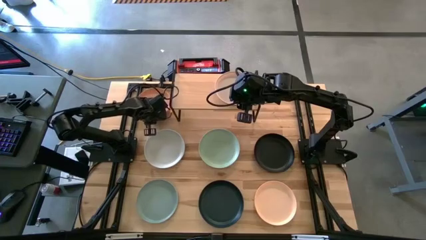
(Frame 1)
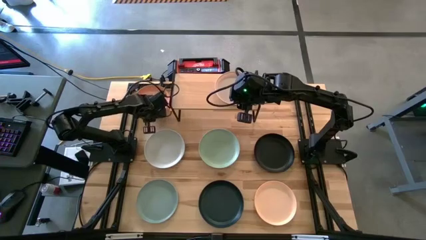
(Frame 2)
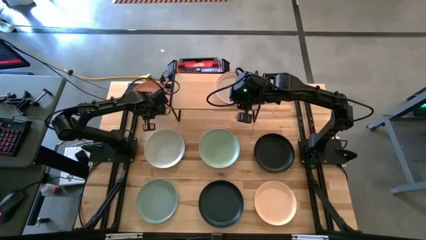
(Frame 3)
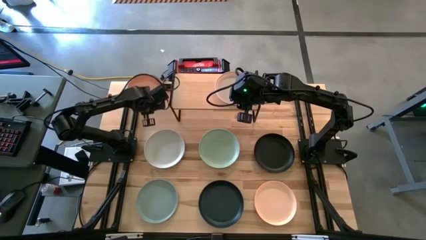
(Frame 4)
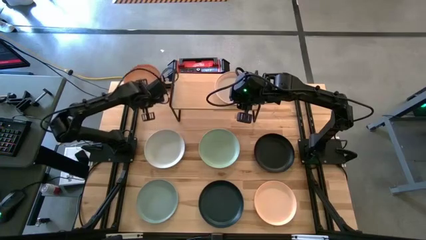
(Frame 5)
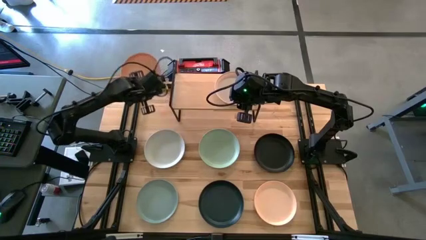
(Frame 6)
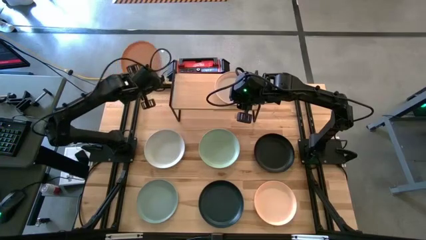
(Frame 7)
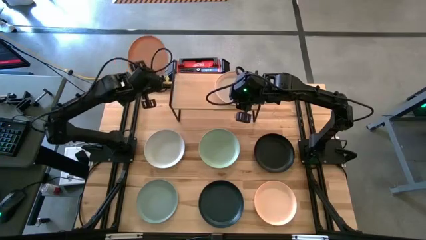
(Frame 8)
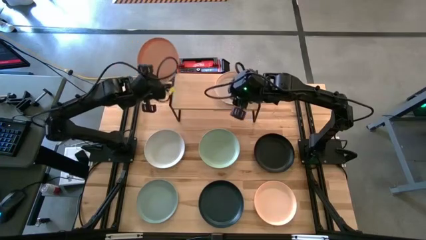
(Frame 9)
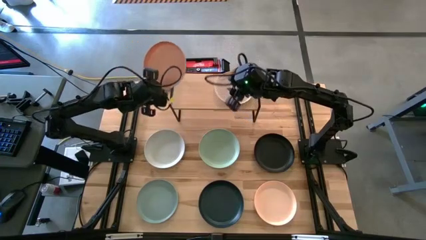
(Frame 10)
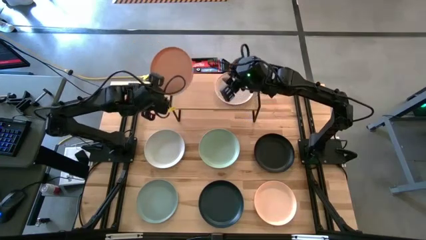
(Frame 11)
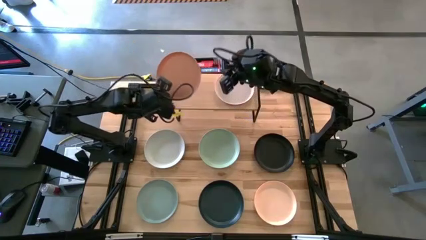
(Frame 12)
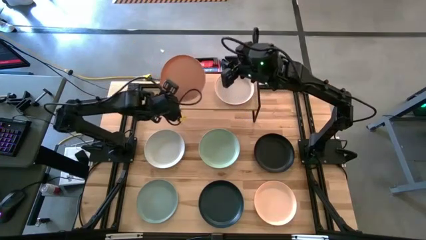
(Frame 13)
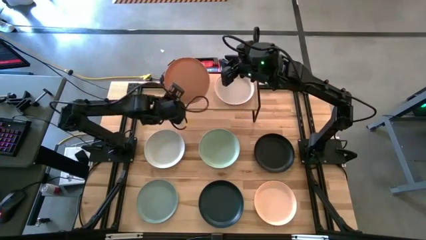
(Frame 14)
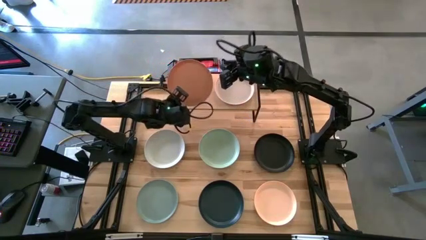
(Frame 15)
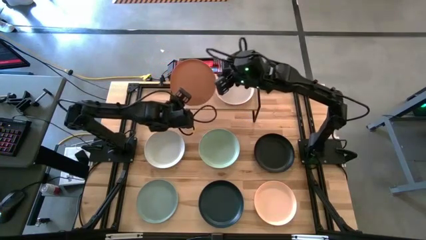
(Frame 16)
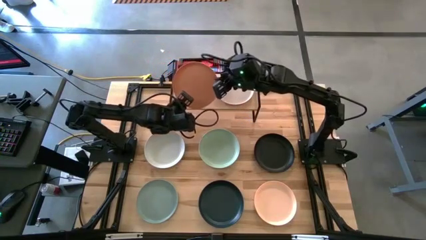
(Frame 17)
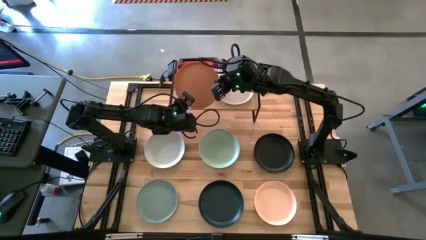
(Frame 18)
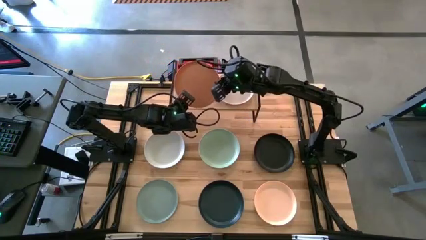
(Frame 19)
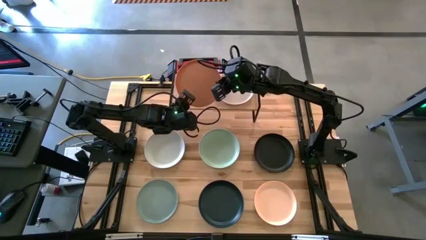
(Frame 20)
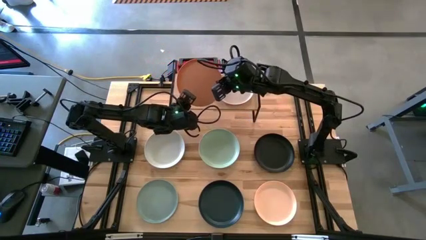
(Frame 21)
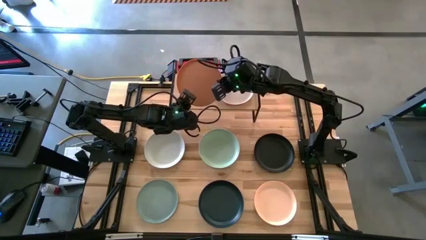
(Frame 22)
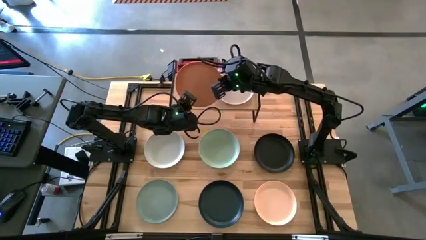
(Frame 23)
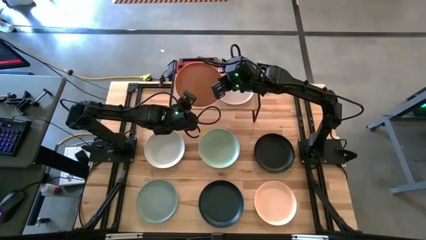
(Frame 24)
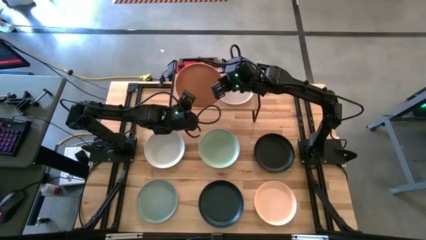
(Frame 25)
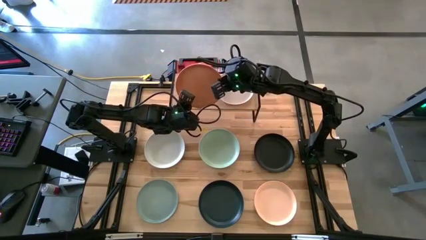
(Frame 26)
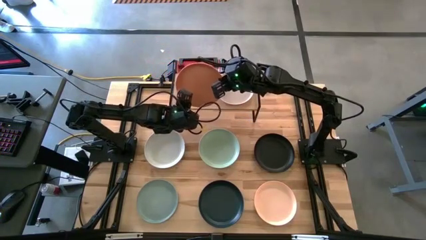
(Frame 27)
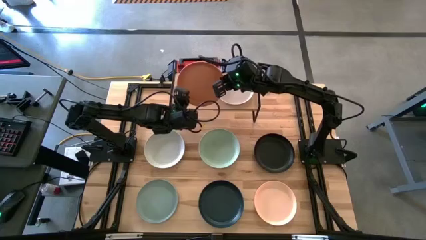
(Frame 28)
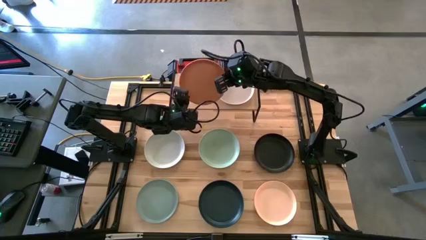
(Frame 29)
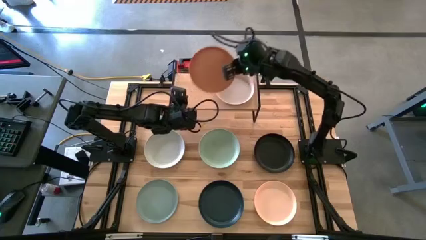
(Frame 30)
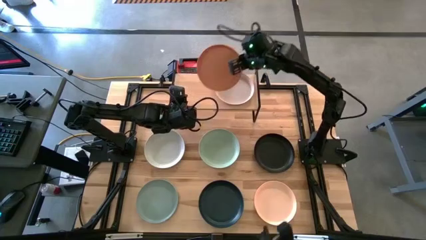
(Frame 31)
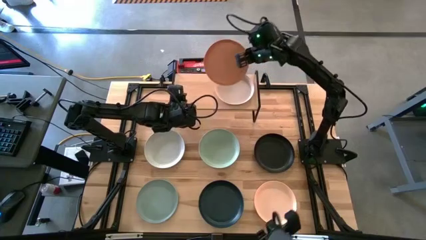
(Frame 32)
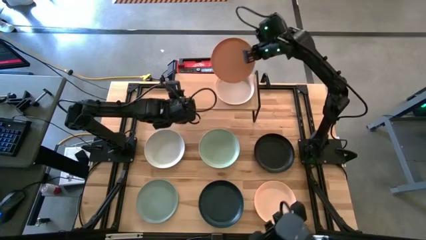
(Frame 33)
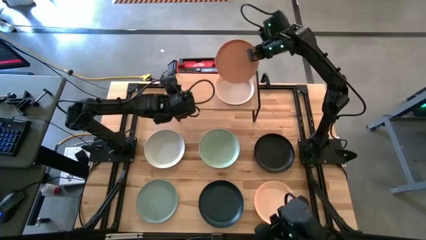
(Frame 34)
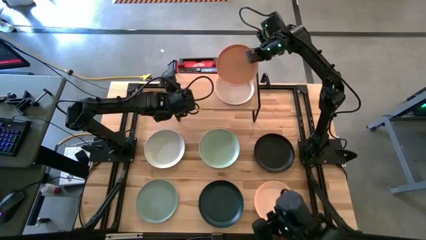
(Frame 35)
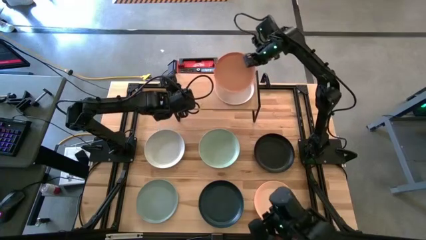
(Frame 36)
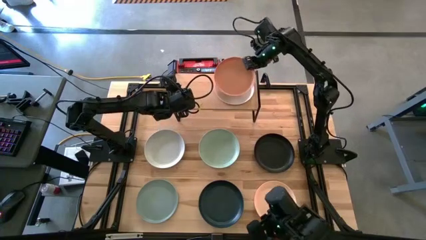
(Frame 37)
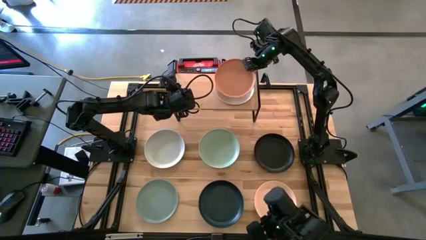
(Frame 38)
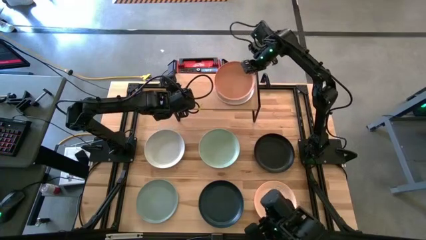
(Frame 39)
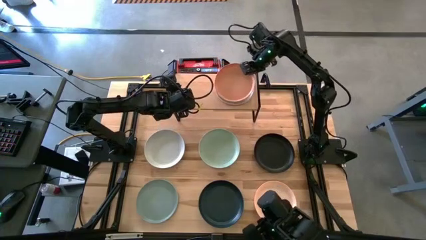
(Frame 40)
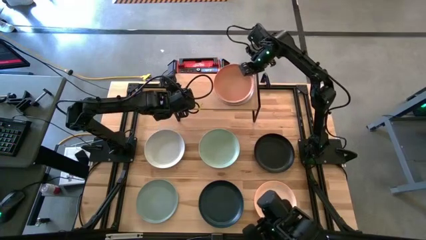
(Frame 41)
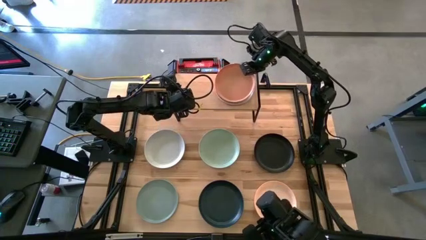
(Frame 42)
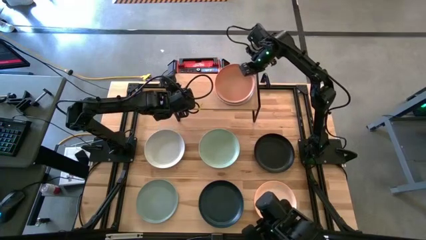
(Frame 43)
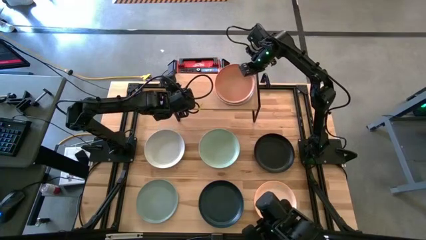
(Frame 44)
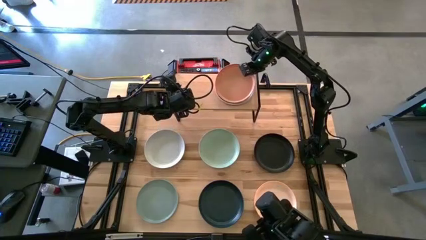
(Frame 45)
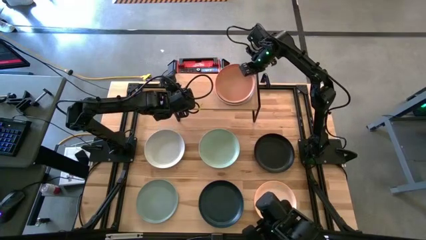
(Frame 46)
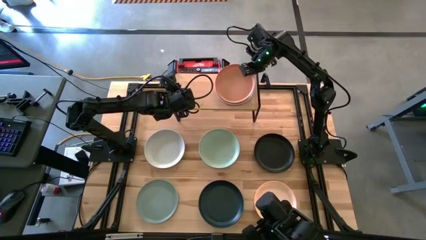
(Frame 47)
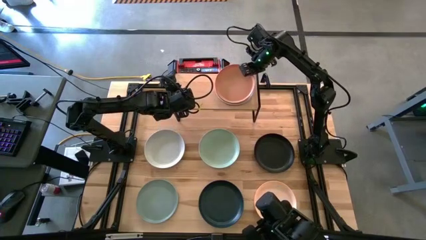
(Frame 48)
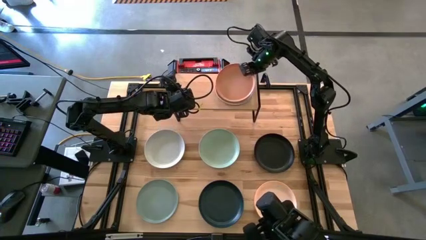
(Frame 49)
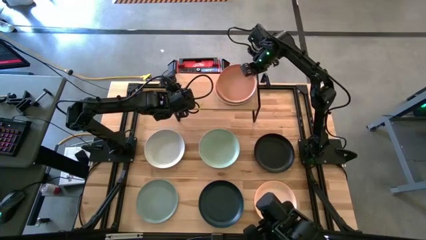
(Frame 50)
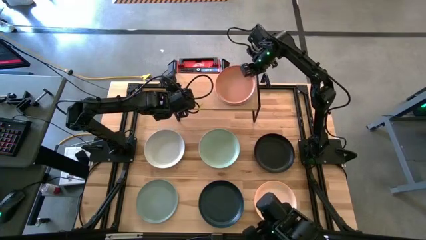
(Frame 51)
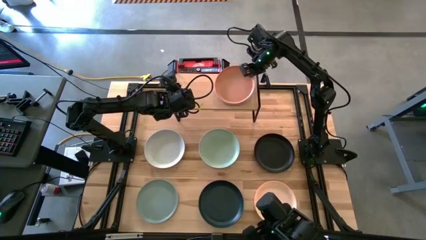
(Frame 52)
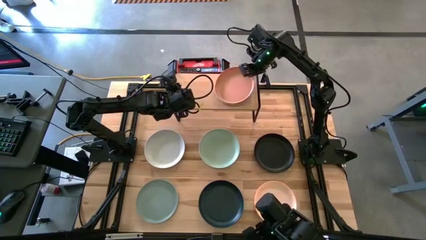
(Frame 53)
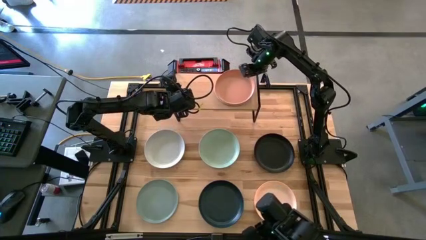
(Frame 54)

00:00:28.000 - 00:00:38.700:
Task: Place and stack plates onto a shelf
Stack the orange plate on top of the light brown plate on the shelf
